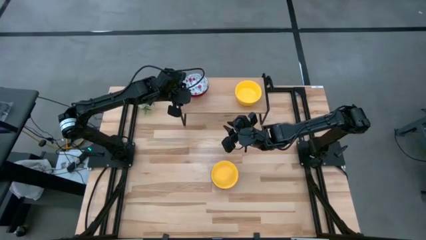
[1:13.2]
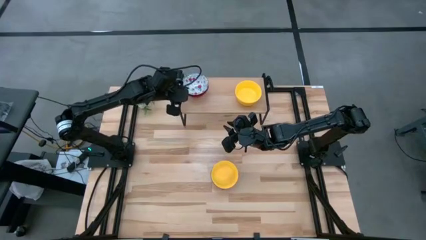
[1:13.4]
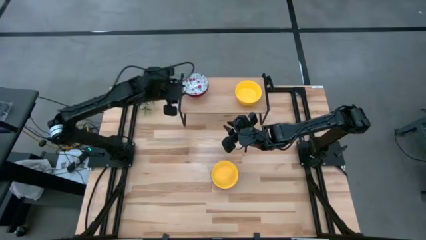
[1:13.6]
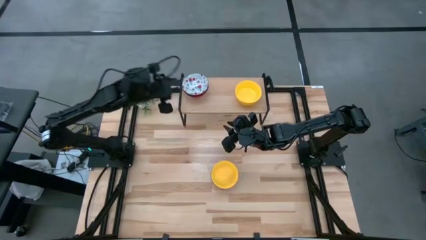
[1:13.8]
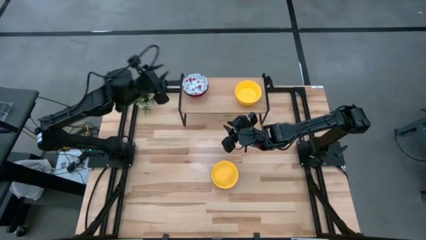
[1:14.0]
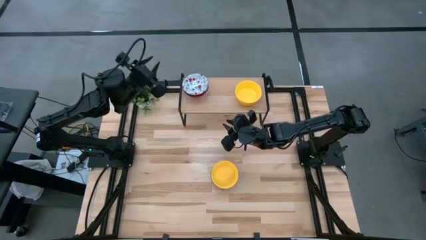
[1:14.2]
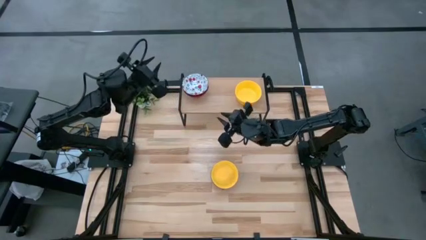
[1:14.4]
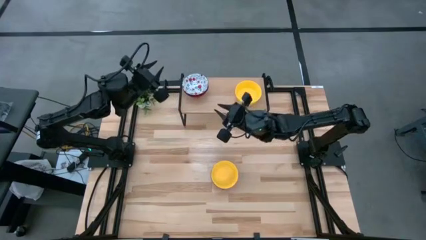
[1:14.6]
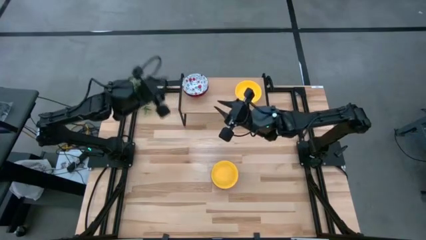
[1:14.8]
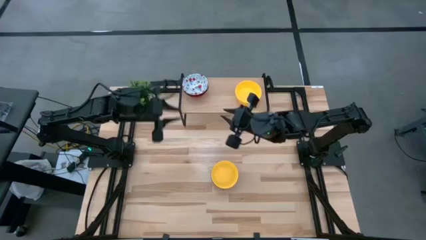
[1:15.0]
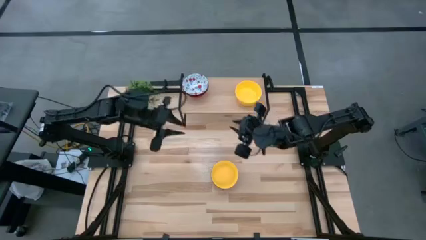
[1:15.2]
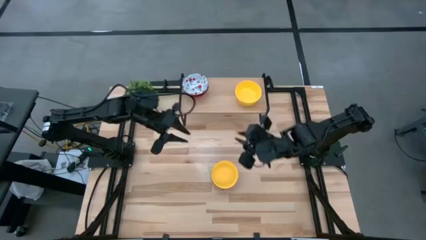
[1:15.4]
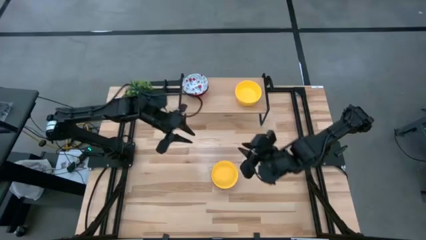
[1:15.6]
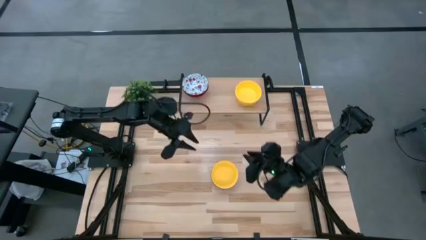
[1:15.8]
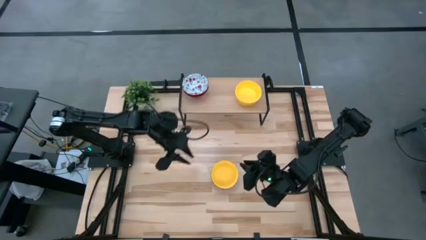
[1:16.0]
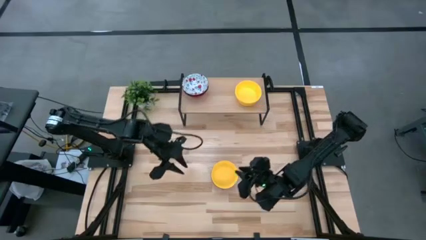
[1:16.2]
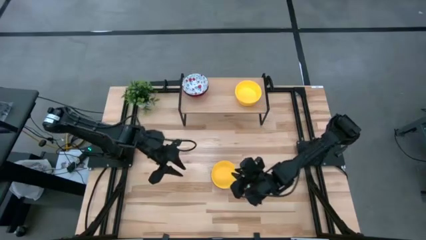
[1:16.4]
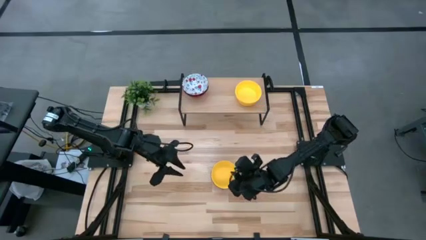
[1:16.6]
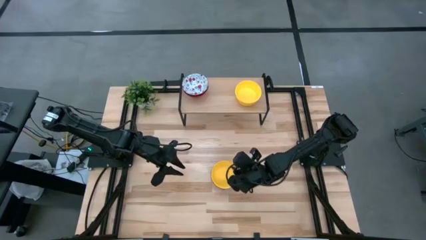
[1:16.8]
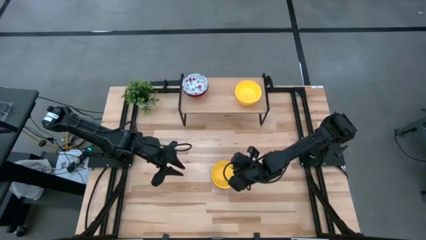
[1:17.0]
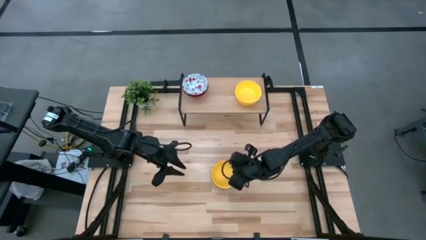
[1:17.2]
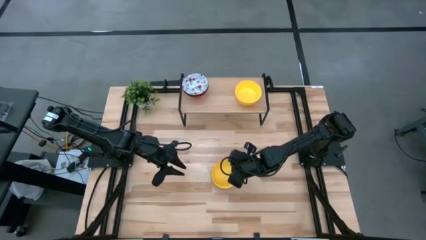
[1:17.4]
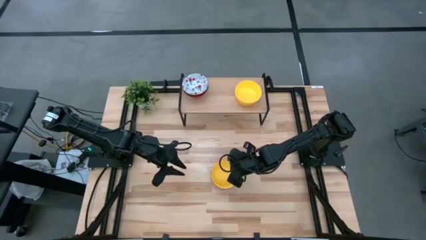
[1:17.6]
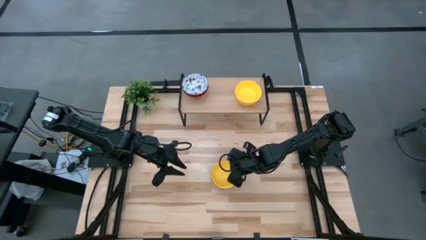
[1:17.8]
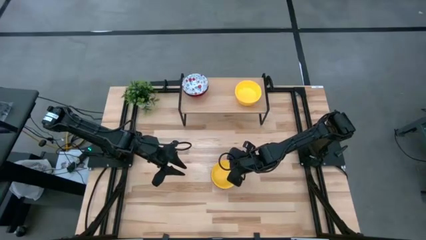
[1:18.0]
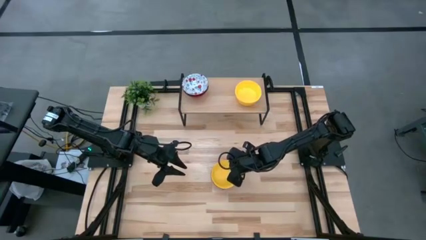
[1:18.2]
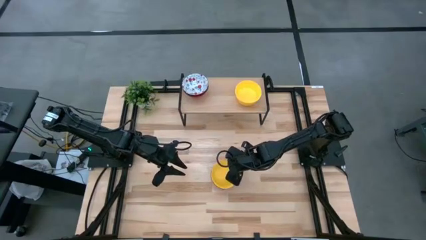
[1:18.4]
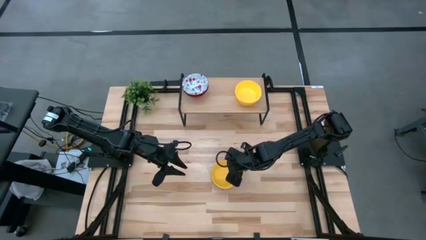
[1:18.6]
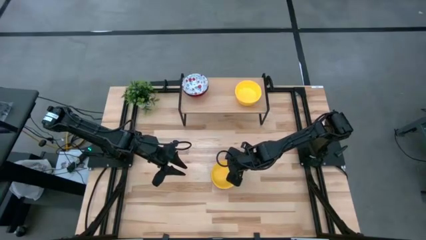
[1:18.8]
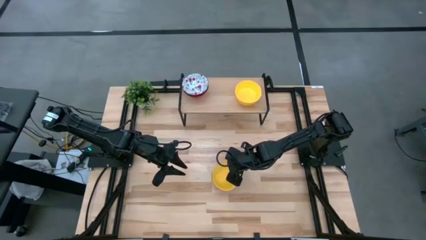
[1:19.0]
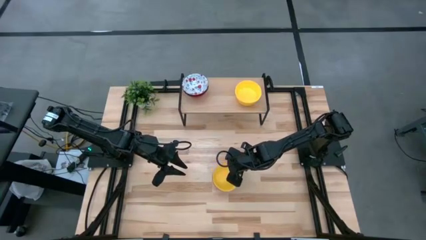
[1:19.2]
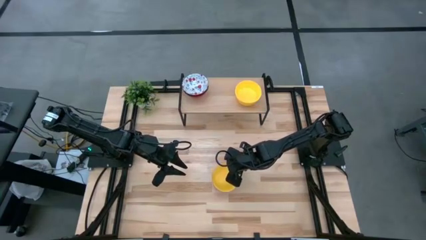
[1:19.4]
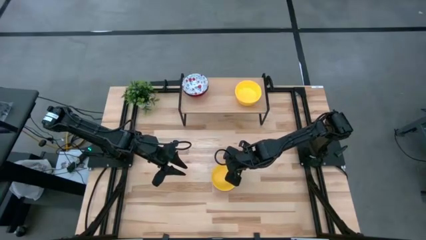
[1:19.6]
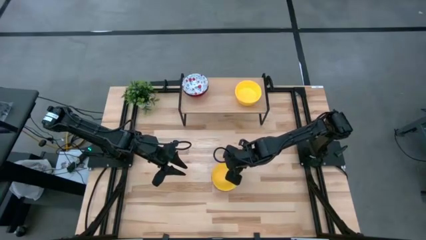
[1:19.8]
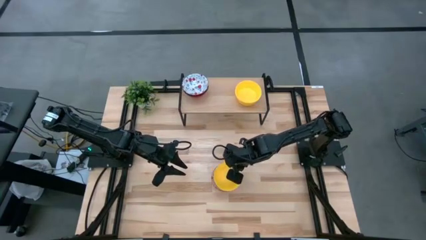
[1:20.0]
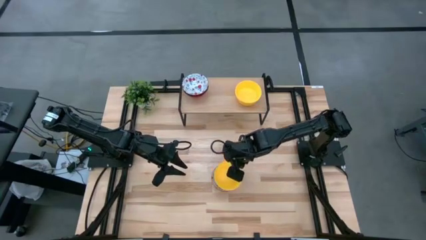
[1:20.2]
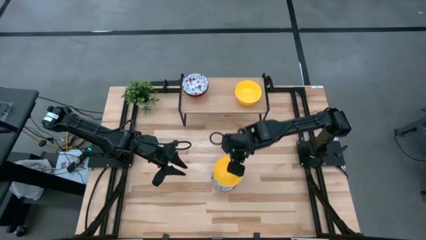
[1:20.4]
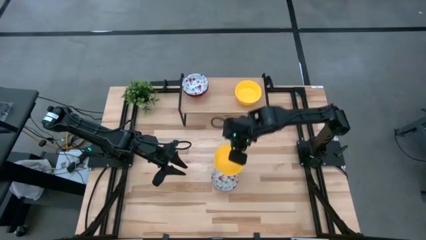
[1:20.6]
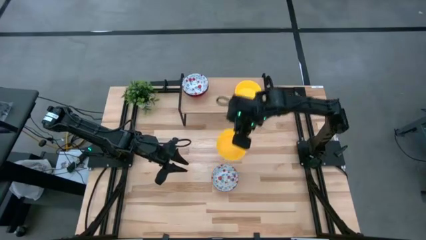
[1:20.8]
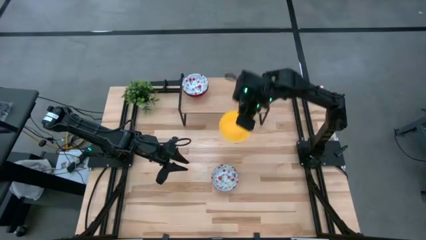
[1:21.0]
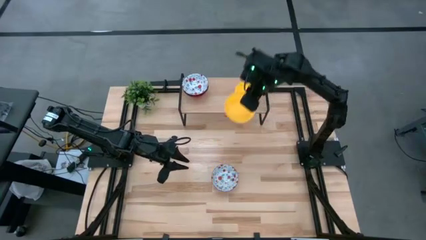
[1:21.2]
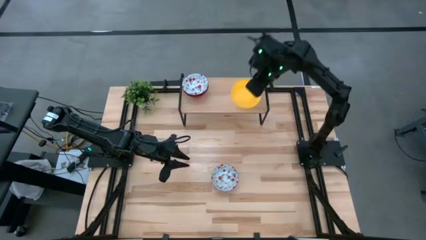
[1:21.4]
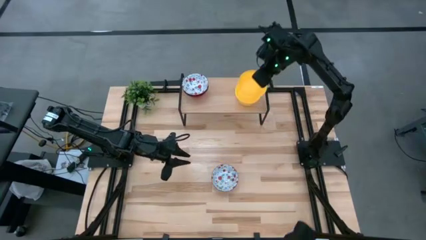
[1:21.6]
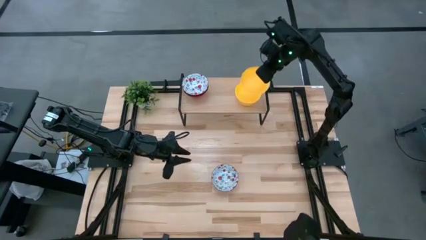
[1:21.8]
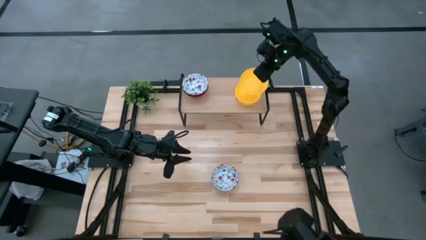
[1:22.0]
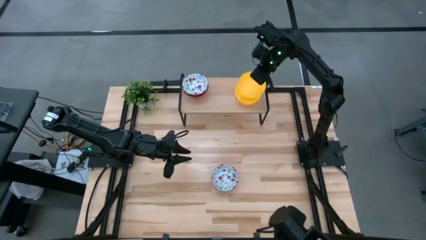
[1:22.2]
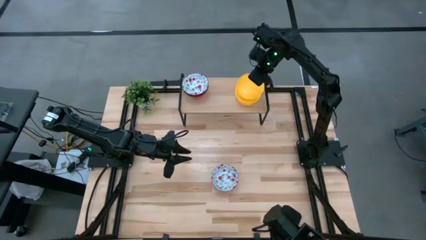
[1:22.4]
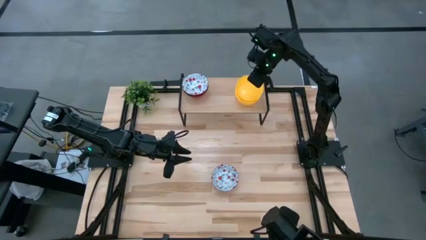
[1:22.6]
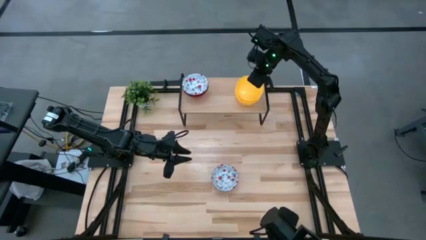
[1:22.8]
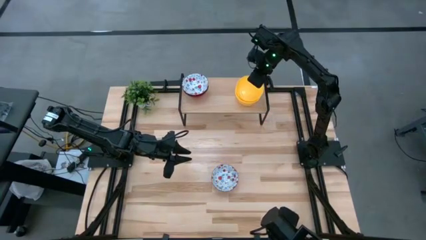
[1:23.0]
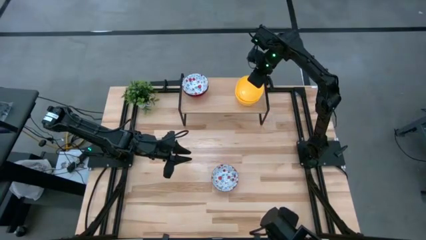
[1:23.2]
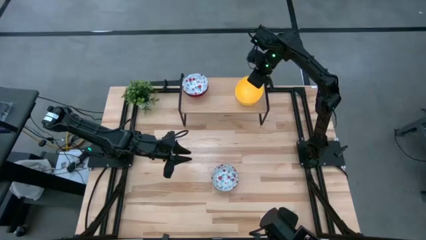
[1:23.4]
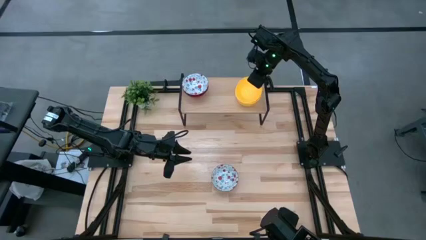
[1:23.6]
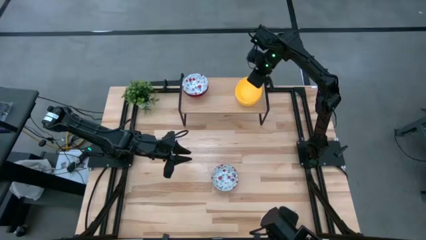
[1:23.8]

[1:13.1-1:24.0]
Task: Pick & Place Mini bowls
Stack the yellow bowl on top of the other yellow bowls on the shelf

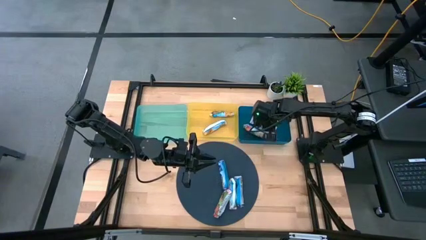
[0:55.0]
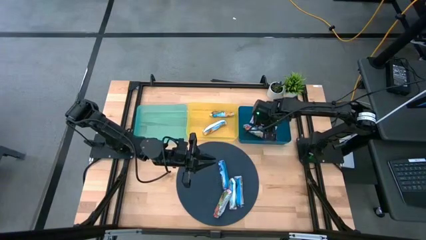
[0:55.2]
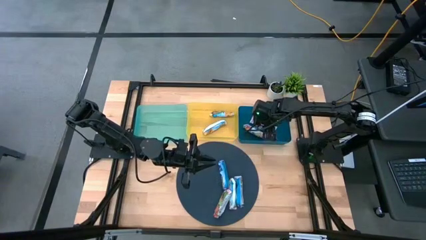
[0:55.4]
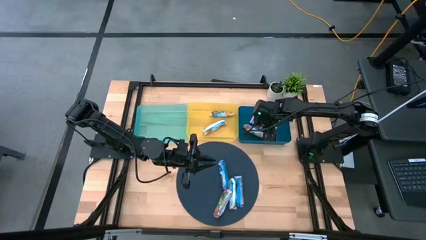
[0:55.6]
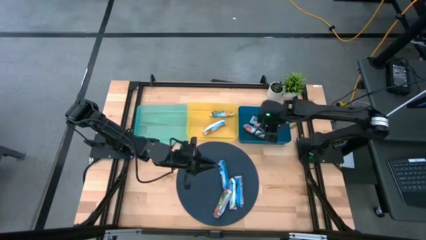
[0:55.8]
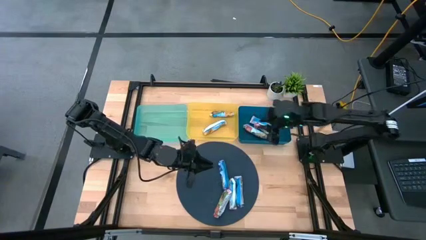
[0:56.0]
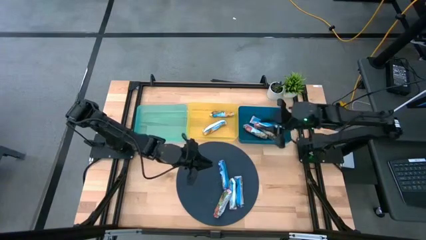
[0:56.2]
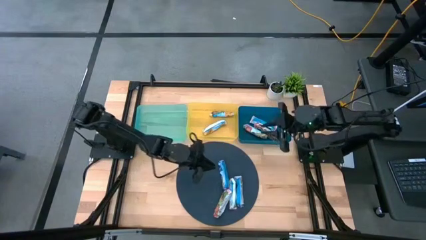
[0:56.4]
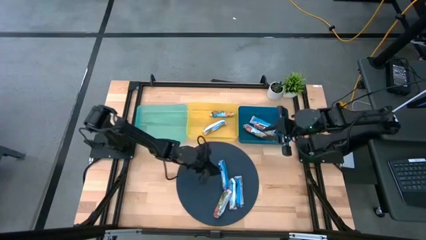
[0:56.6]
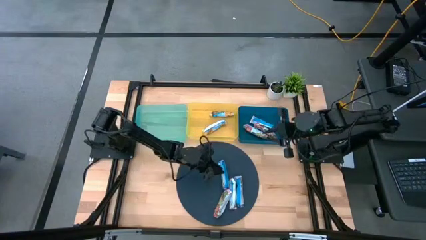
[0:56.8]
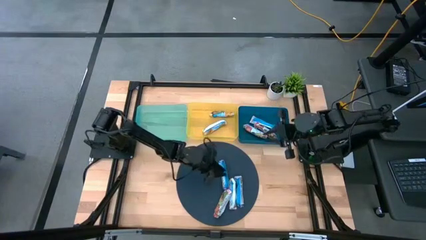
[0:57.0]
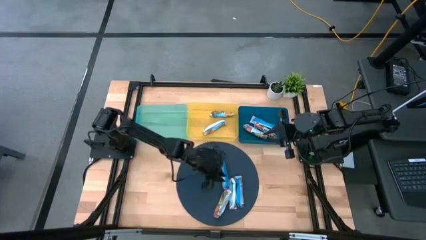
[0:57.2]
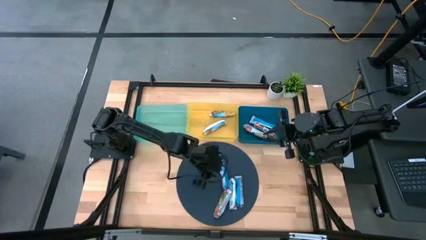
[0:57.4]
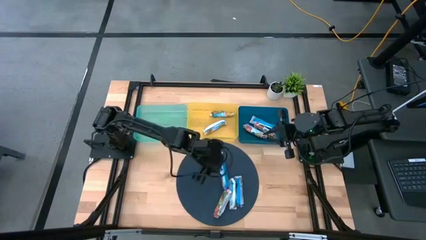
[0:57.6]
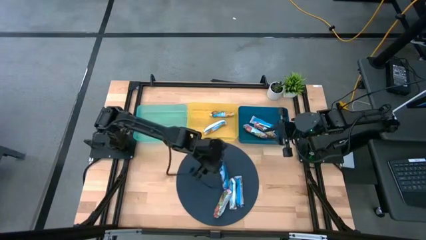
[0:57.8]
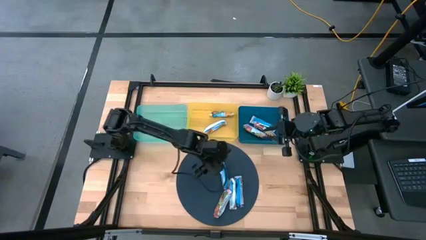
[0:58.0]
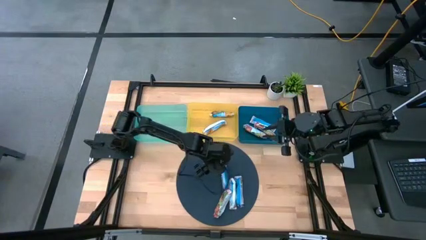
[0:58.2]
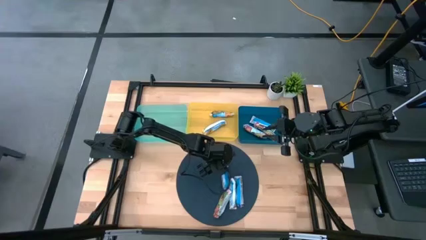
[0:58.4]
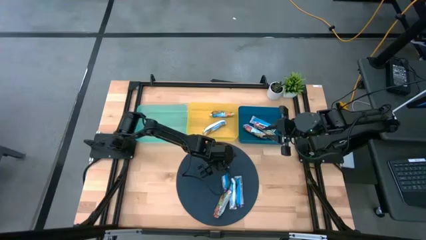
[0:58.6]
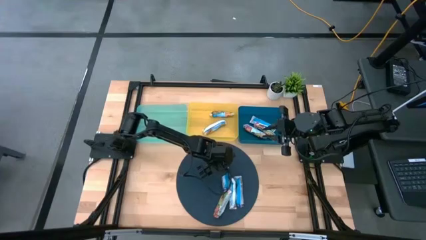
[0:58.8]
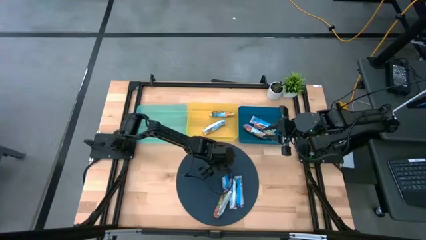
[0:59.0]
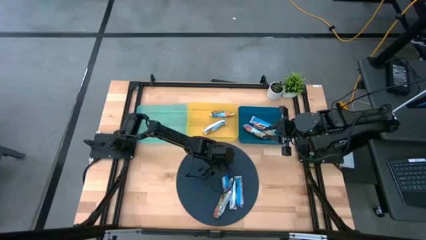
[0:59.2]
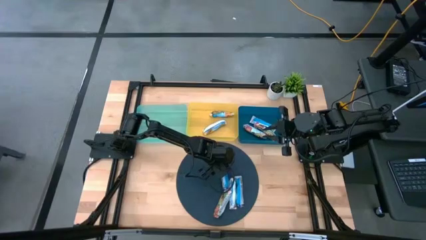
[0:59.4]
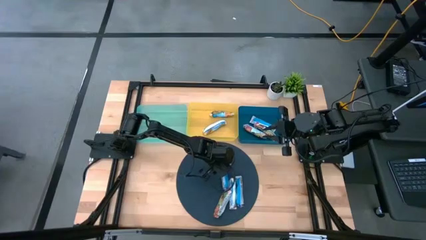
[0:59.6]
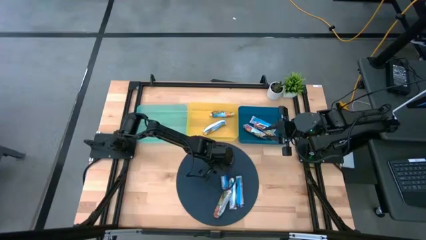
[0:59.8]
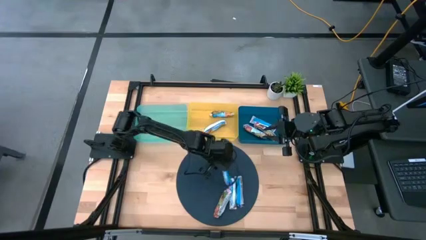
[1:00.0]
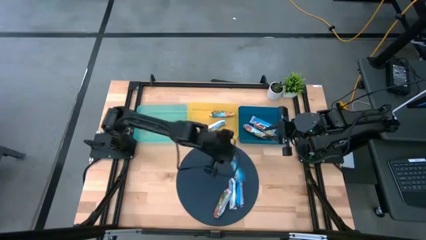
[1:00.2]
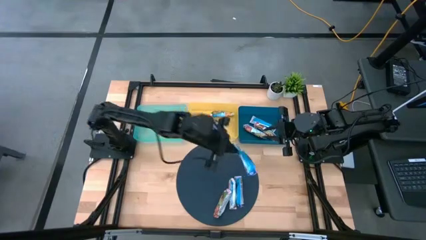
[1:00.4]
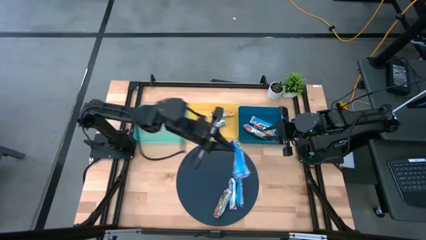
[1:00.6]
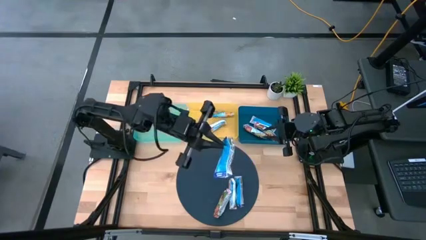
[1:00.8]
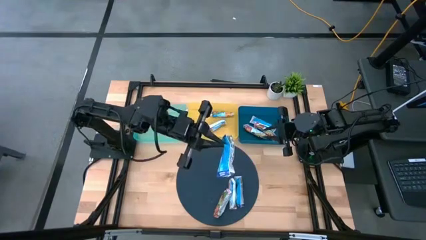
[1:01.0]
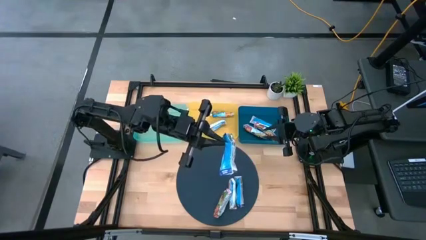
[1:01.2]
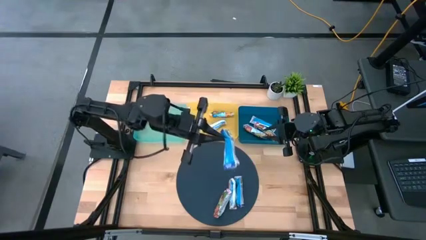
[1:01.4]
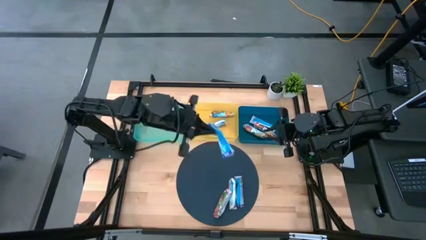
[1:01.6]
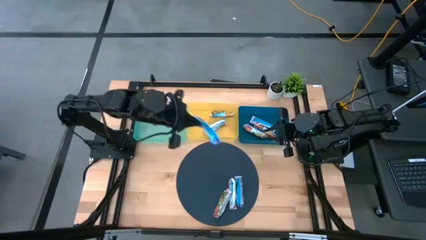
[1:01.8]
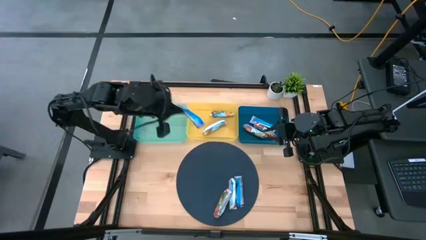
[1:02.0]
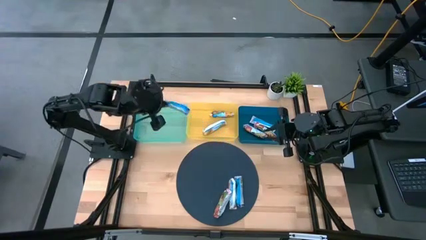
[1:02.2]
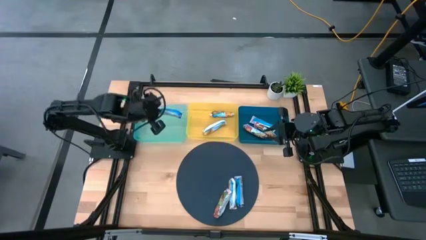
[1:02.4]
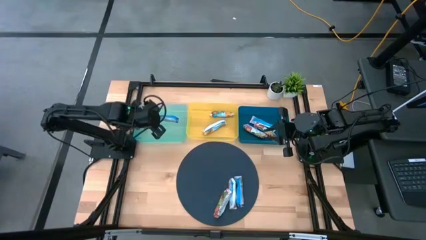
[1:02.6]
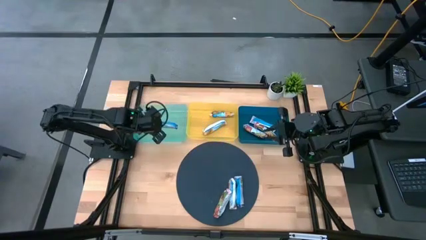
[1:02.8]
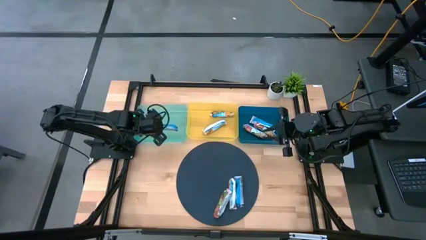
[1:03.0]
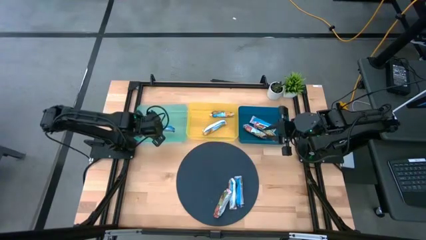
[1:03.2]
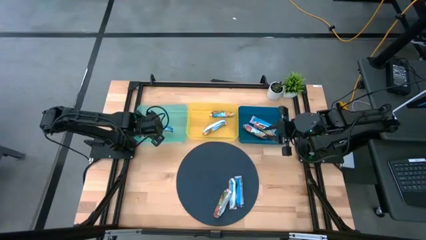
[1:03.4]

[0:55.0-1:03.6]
Task: Pick and place Granola Bars by type
Put the blue granola bar into the green bin
